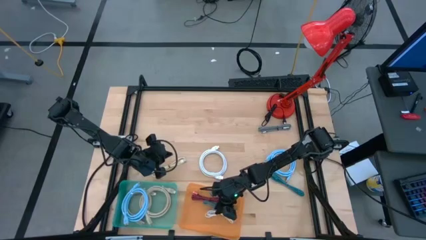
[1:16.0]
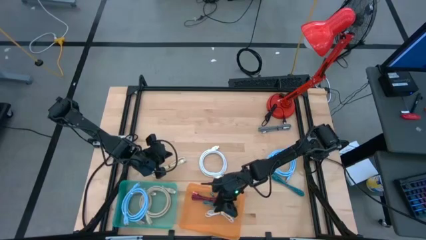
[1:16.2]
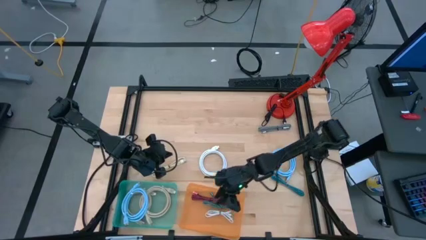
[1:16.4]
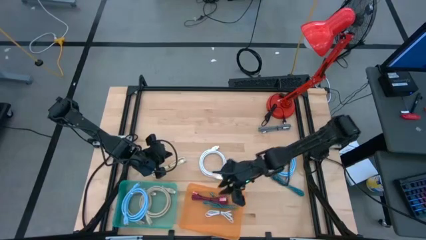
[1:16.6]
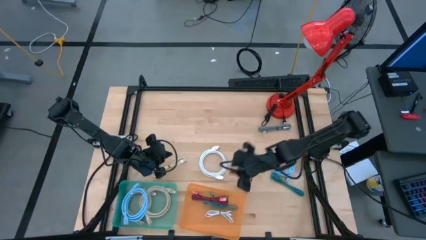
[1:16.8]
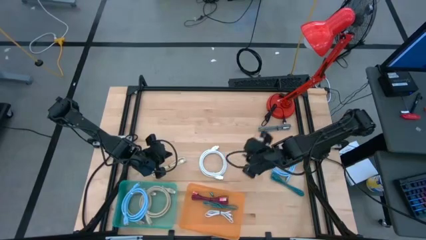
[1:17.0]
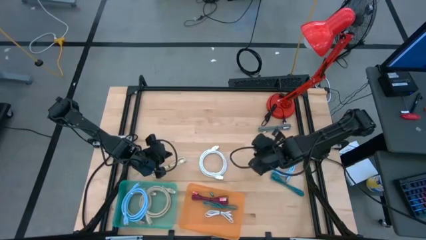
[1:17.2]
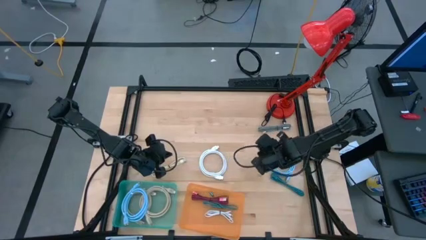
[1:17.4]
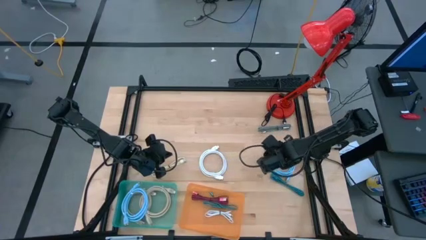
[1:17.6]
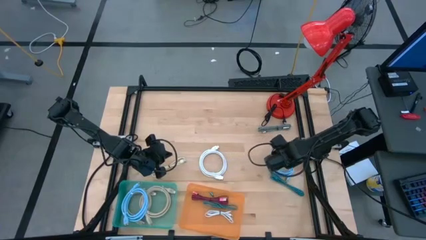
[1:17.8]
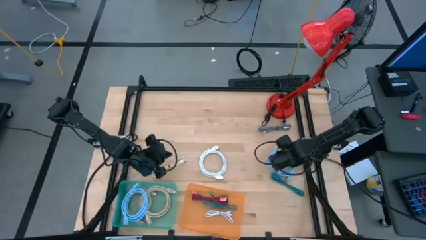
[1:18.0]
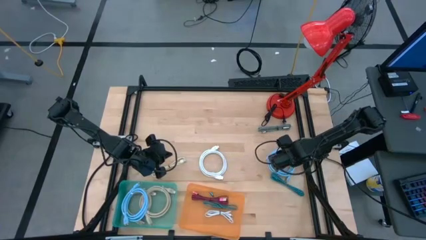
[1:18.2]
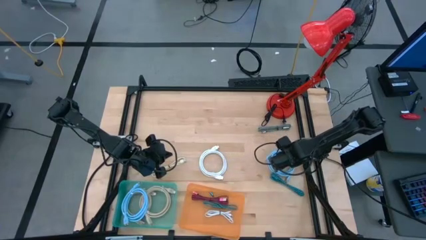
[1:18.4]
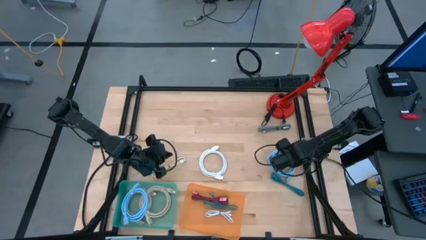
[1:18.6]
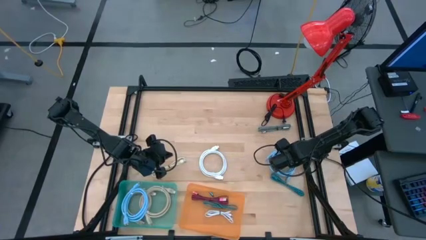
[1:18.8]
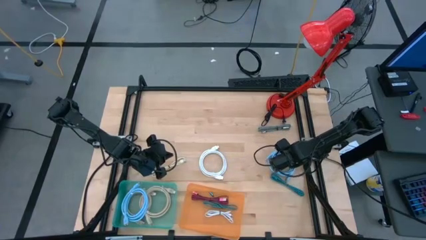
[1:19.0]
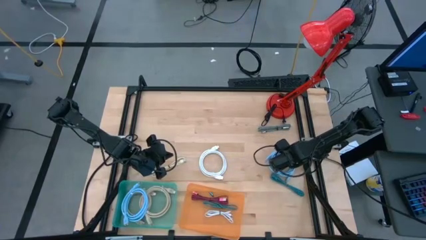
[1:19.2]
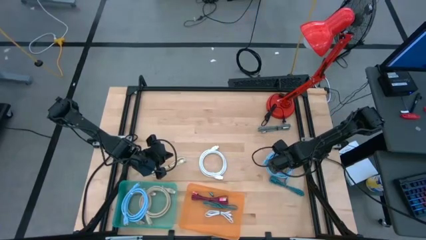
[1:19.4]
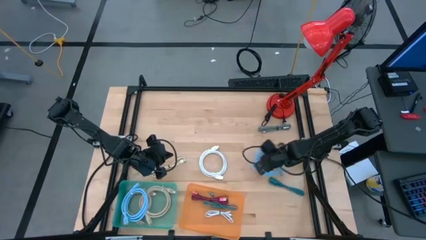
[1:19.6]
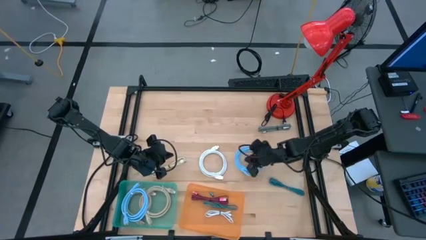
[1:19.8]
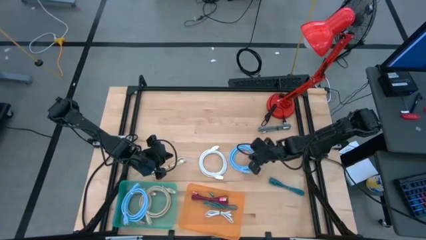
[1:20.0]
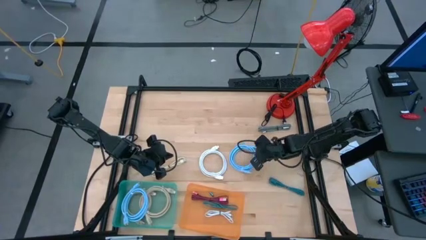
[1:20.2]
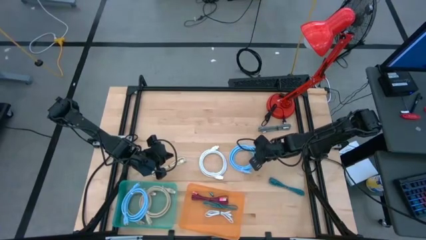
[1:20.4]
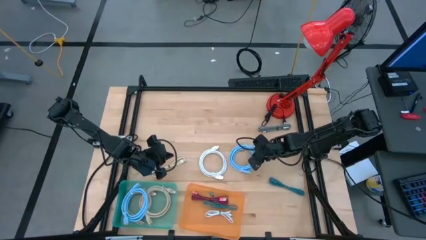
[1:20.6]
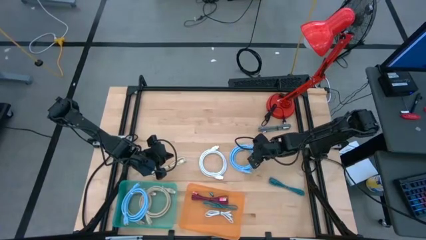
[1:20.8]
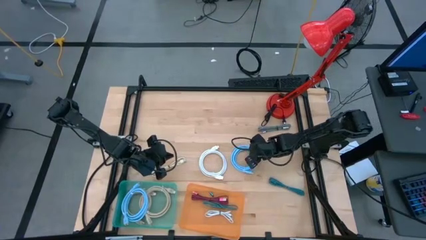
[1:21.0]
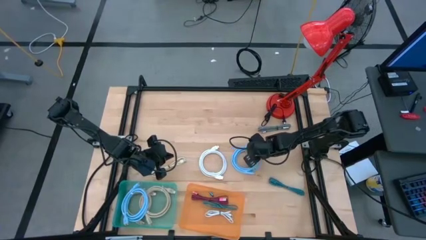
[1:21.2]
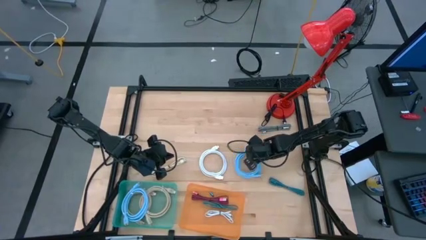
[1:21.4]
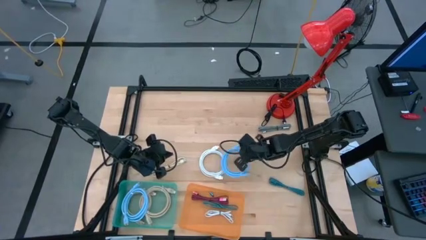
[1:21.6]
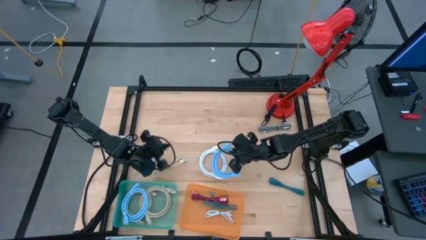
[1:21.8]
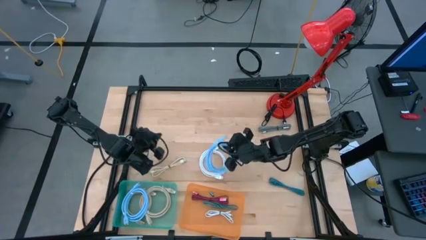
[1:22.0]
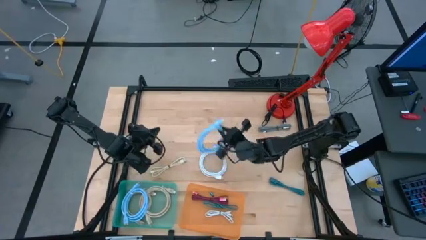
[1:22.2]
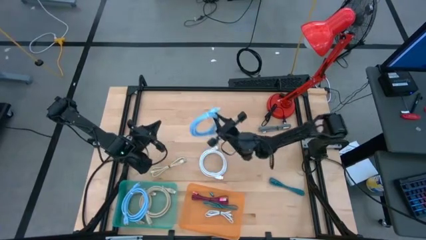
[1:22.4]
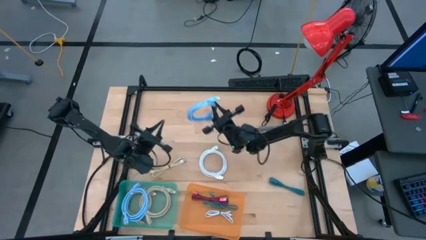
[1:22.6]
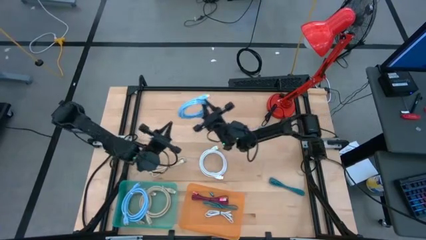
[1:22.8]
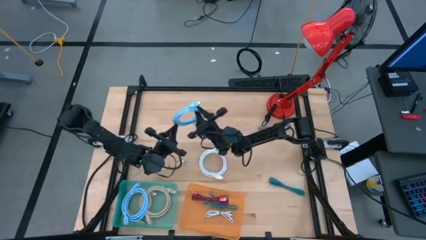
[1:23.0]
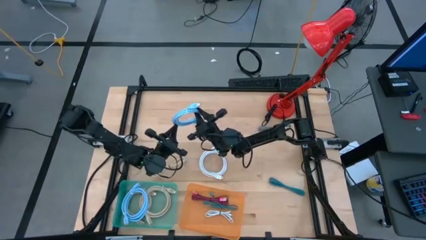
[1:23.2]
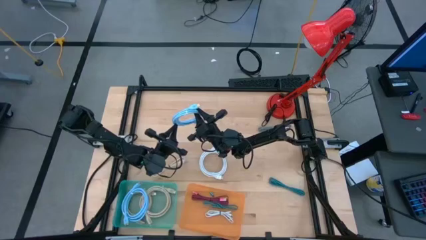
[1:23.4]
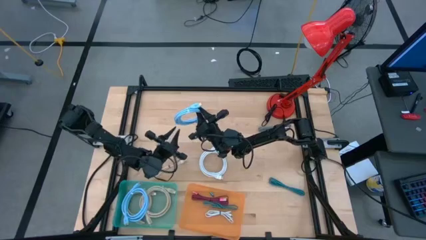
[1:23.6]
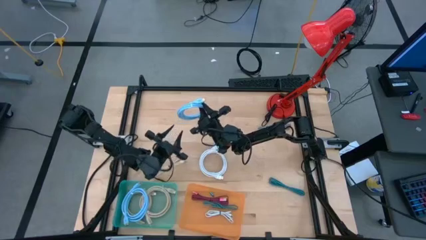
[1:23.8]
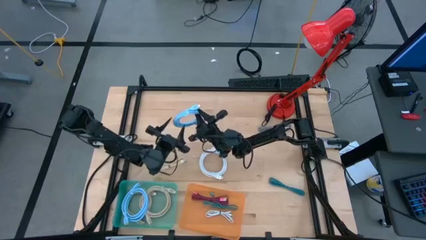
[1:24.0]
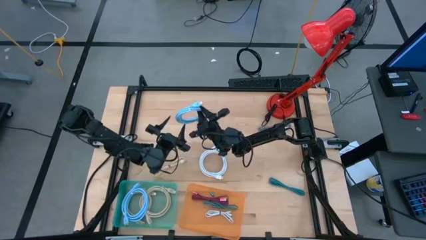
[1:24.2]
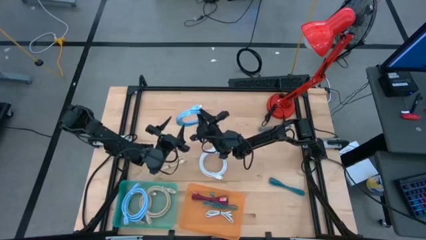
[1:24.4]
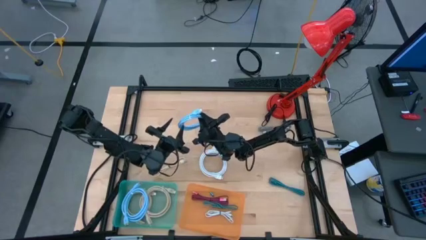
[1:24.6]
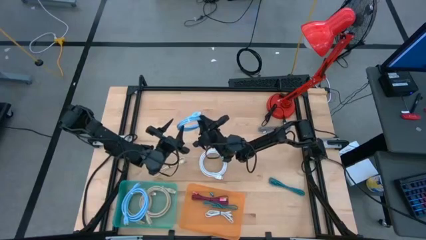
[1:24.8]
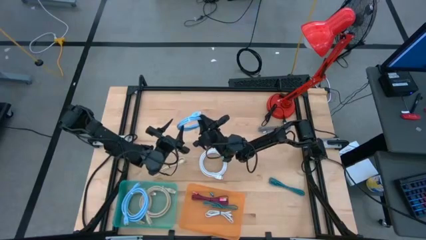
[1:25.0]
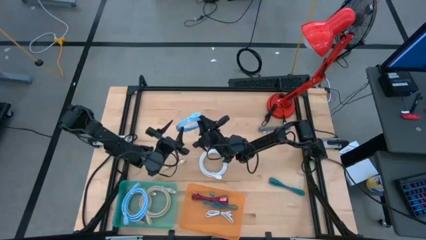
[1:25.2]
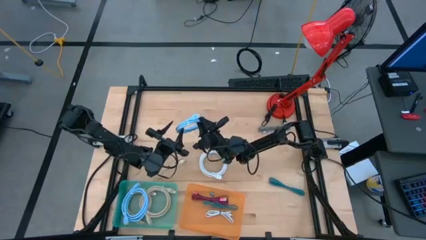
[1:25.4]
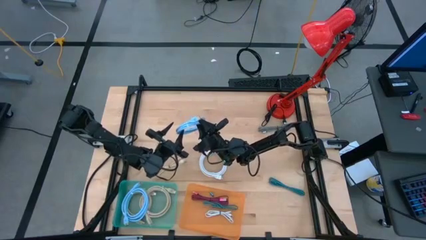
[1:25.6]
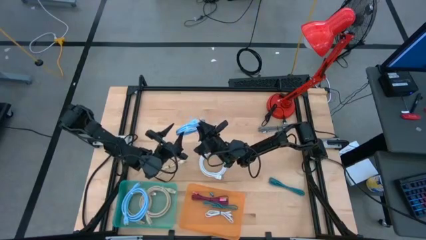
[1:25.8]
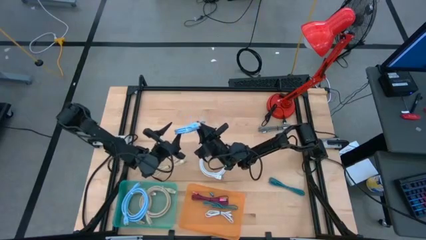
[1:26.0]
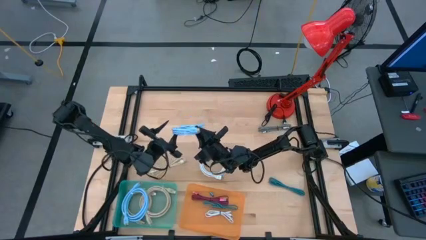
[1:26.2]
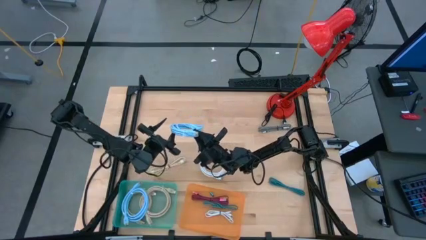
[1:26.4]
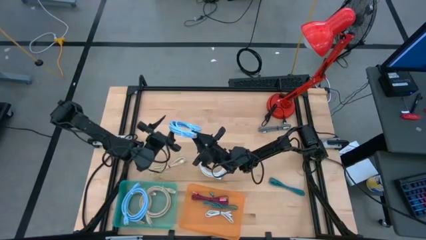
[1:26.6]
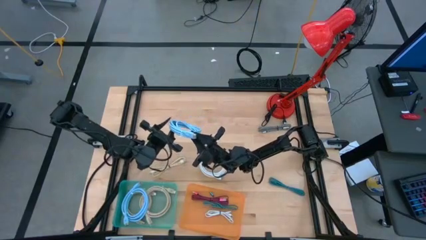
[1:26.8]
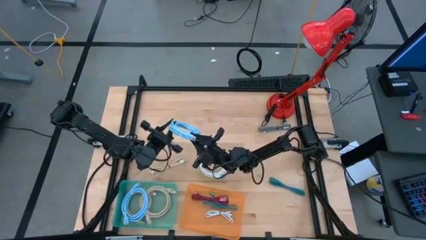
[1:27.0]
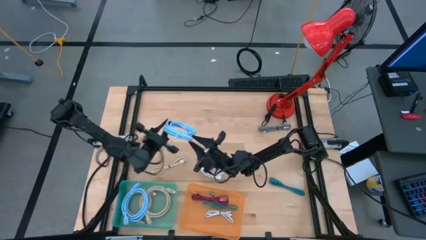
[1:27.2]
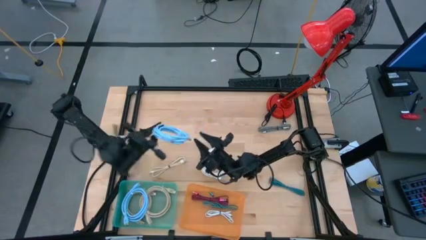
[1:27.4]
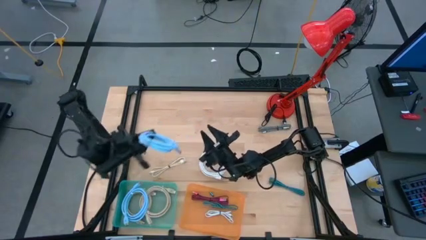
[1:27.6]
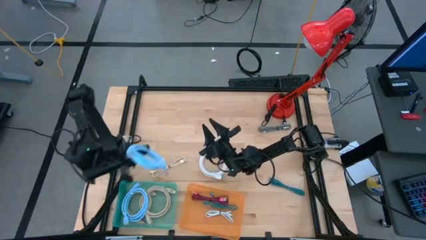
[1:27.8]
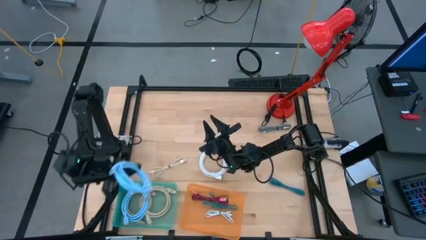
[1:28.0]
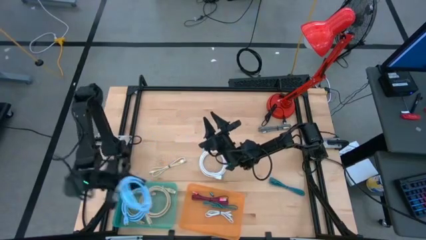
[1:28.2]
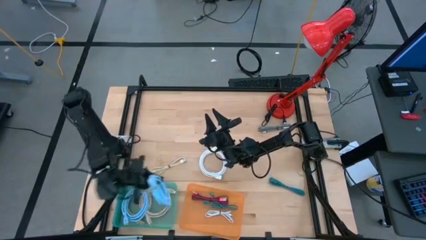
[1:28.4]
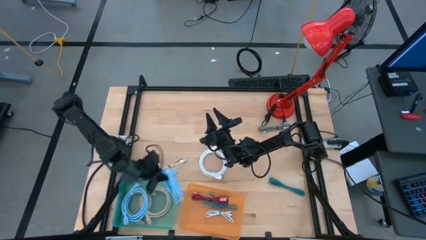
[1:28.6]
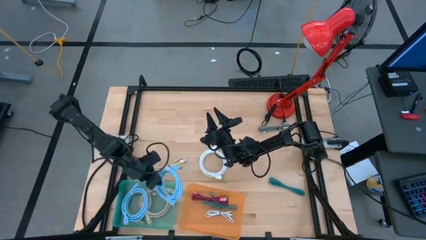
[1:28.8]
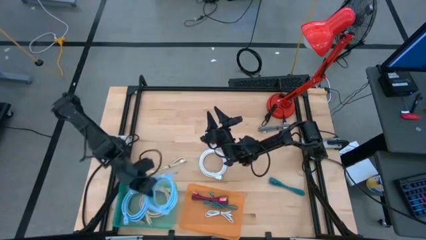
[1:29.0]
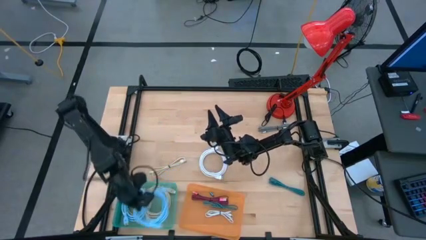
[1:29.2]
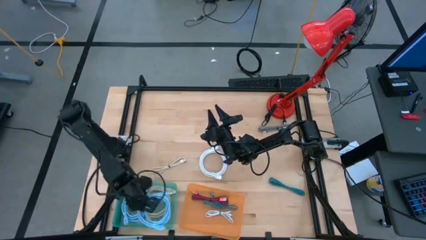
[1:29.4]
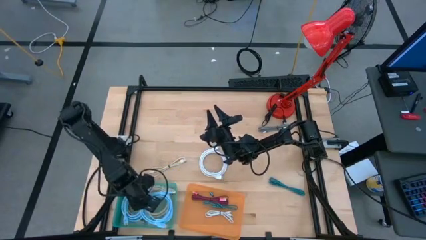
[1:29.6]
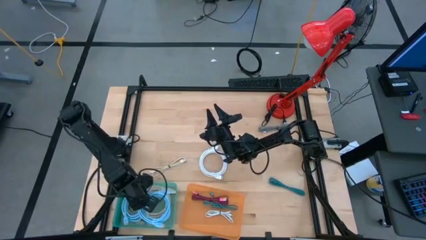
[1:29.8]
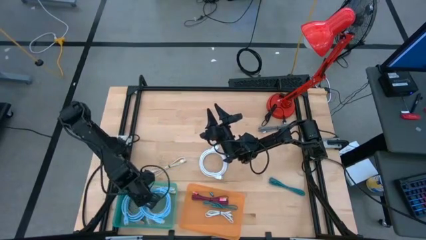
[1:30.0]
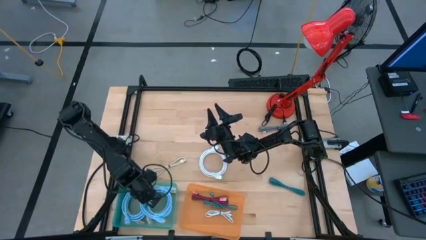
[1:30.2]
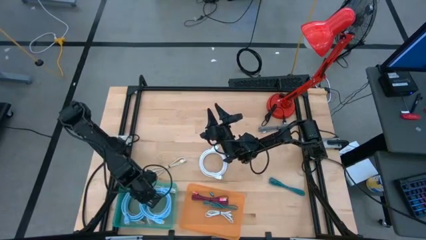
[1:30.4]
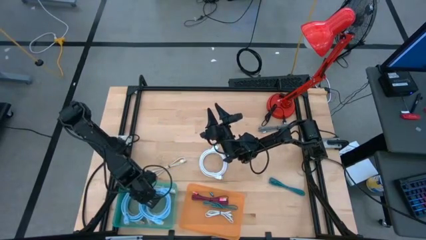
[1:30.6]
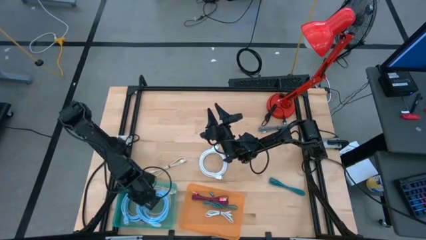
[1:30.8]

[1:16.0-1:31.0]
Task: Pick & Place USB Port
Put the blue HDMI cable into the green bin

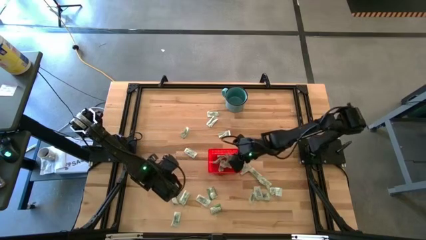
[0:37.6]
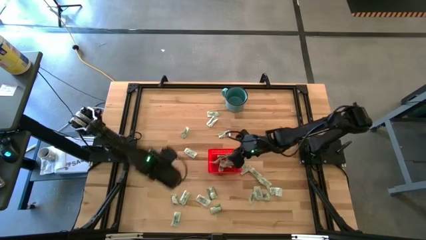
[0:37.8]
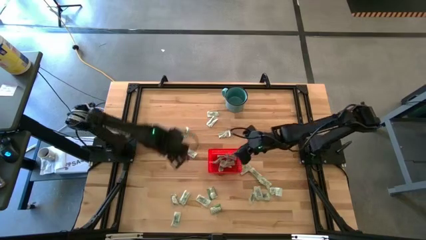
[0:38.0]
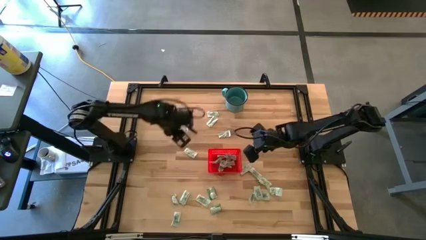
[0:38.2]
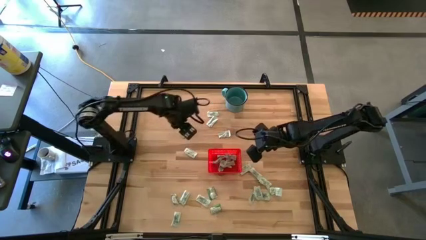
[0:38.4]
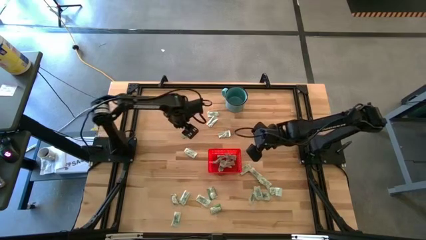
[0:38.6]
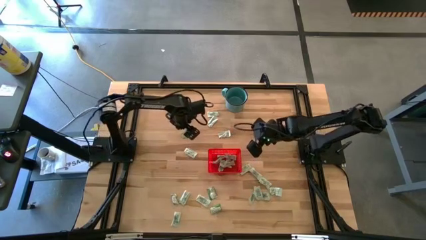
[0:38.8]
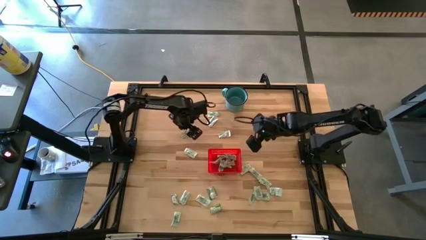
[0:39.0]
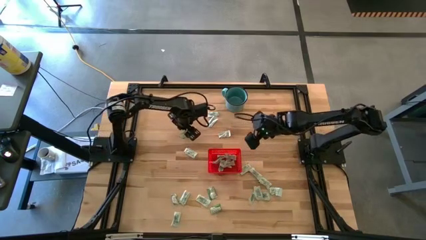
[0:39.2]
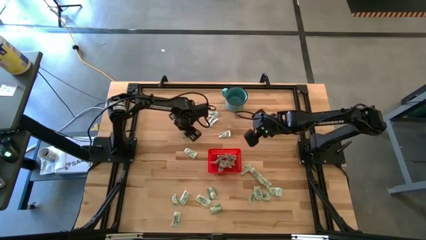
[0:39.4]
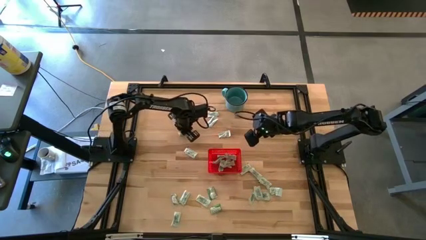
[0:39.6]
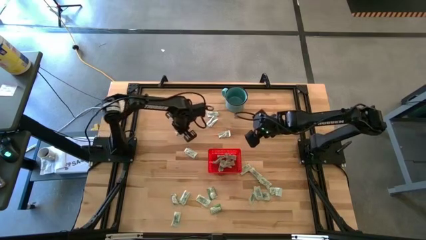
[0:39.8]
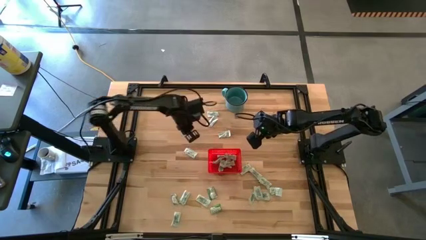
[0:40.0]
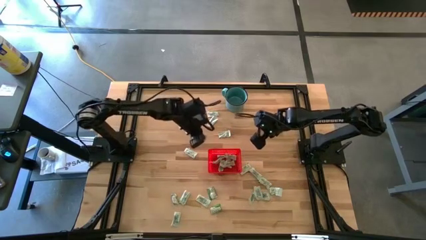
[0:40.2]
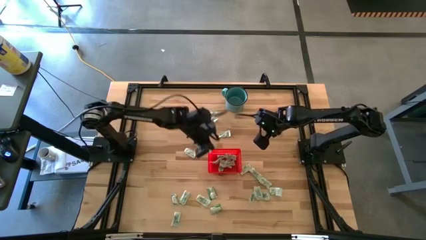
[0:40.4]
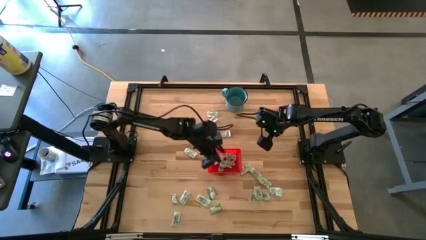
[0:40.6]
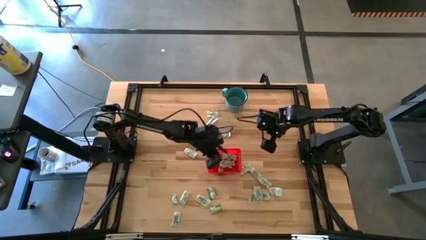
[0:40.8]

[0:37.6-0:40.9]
Task: Pick and place Stevia / Truvia into bins
Put the green stevia packet into the red bin
